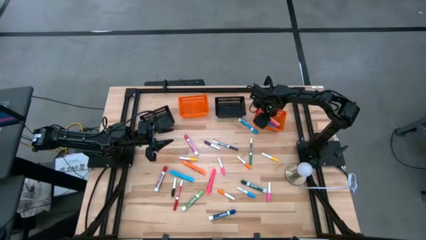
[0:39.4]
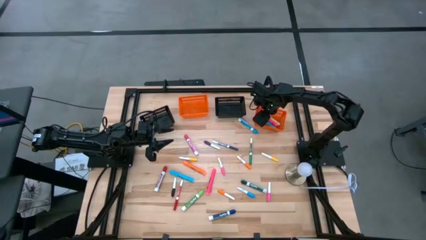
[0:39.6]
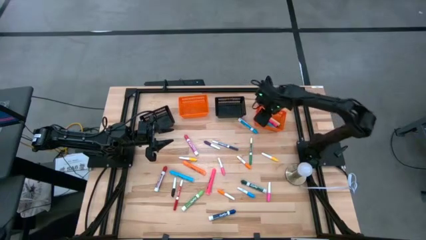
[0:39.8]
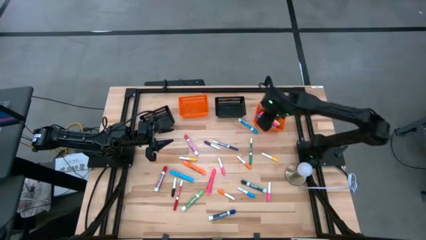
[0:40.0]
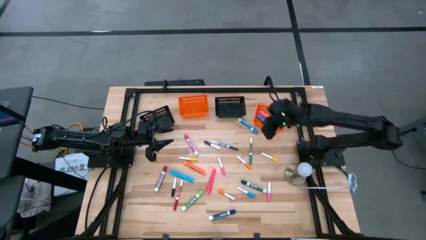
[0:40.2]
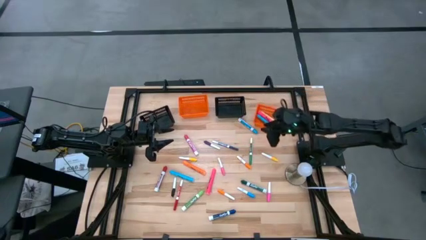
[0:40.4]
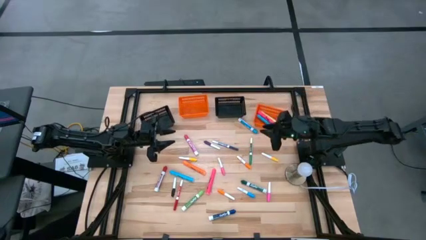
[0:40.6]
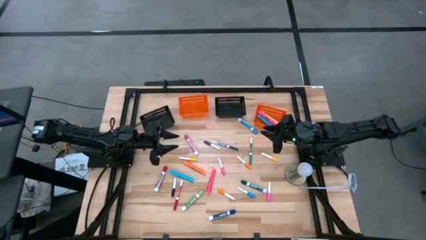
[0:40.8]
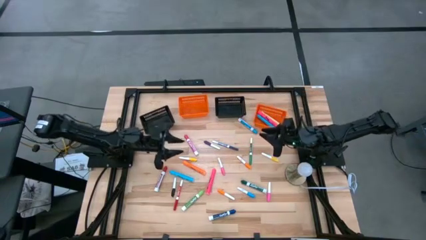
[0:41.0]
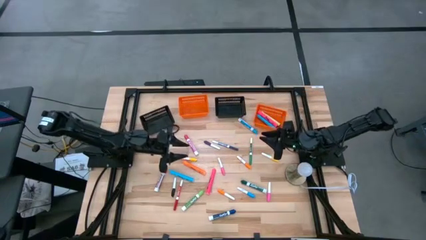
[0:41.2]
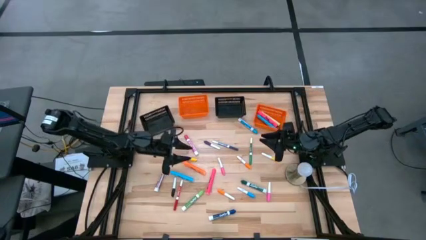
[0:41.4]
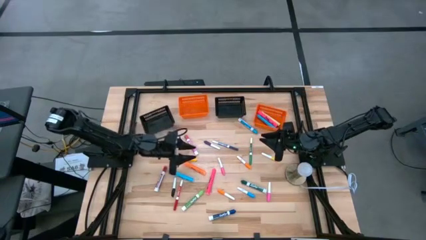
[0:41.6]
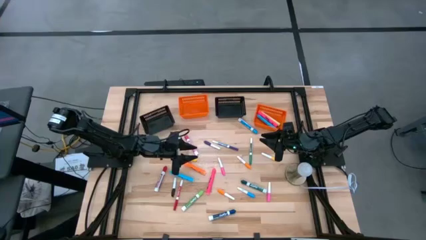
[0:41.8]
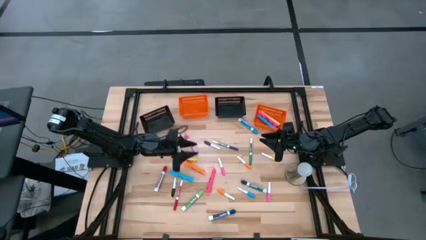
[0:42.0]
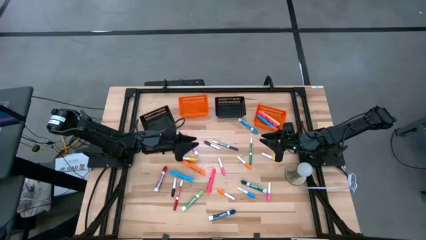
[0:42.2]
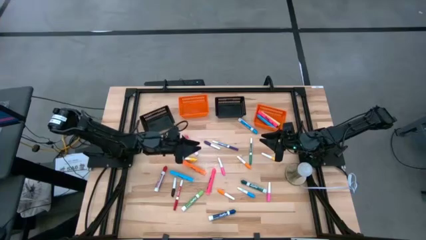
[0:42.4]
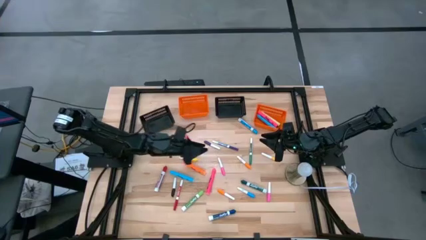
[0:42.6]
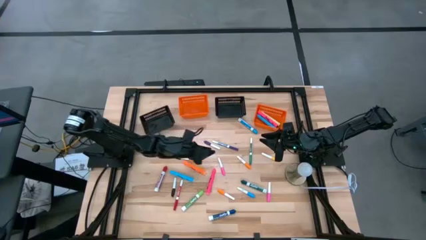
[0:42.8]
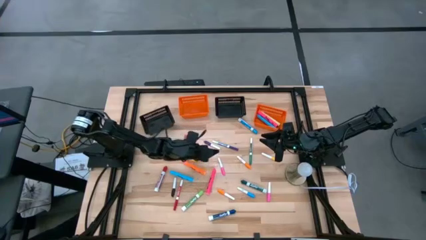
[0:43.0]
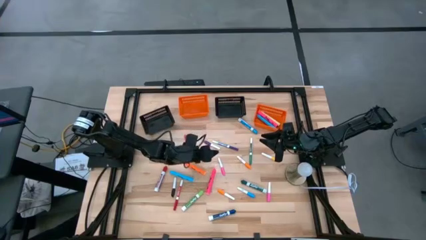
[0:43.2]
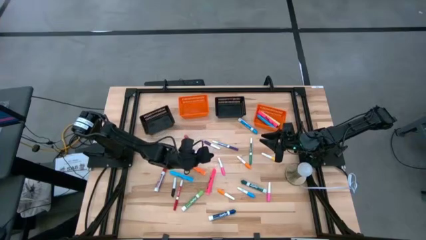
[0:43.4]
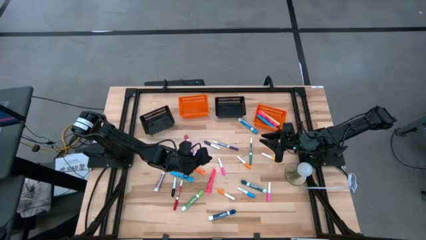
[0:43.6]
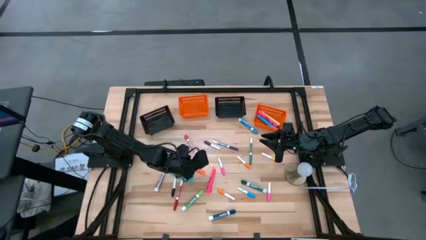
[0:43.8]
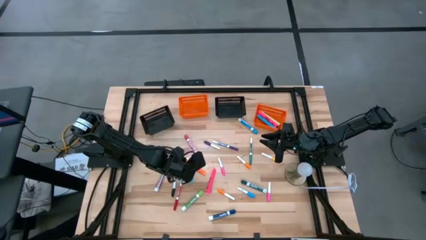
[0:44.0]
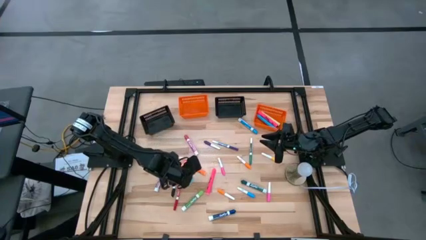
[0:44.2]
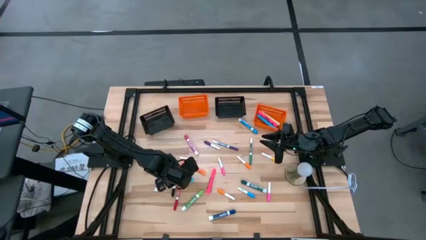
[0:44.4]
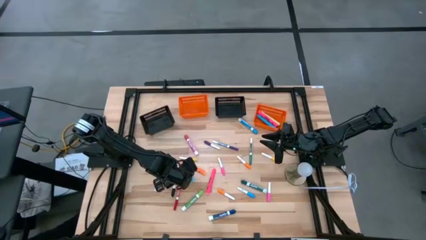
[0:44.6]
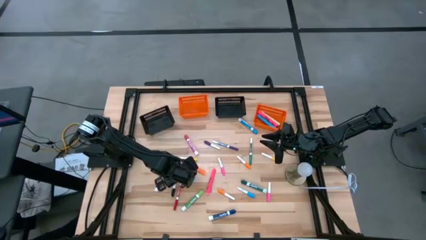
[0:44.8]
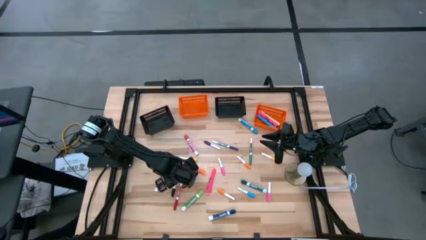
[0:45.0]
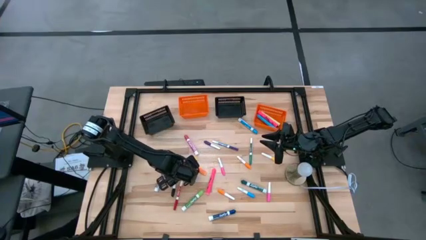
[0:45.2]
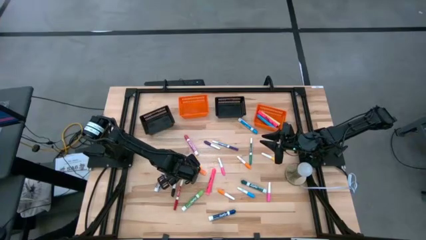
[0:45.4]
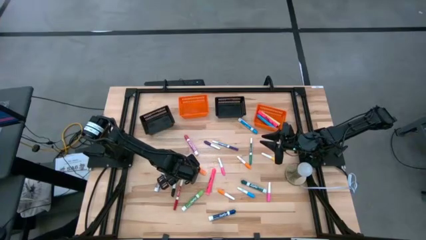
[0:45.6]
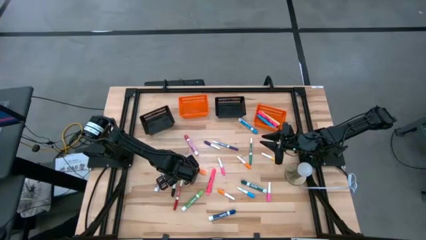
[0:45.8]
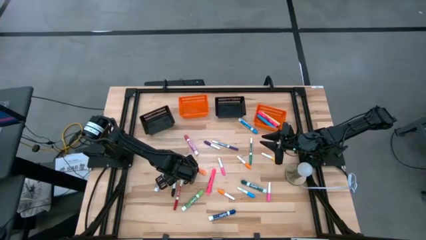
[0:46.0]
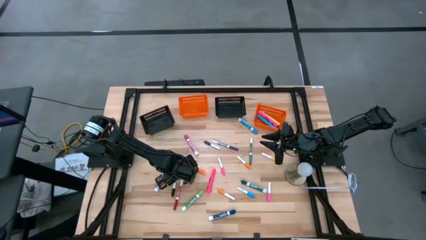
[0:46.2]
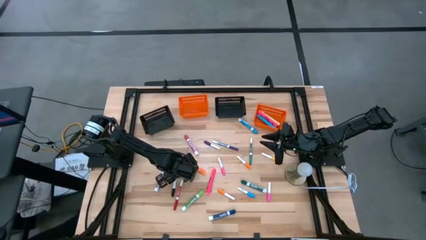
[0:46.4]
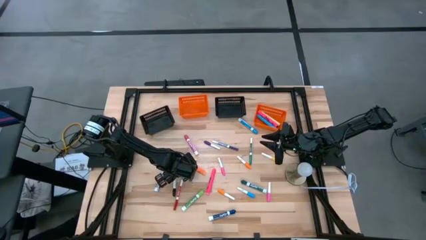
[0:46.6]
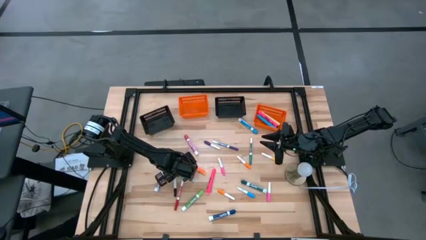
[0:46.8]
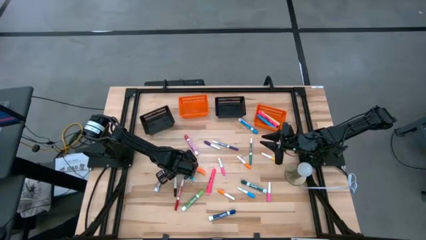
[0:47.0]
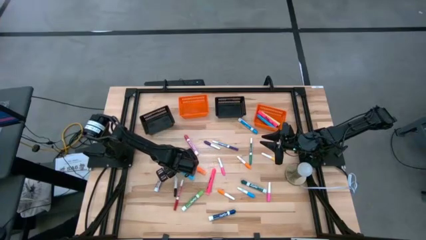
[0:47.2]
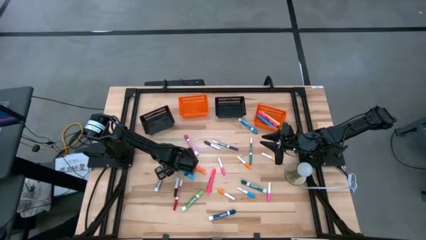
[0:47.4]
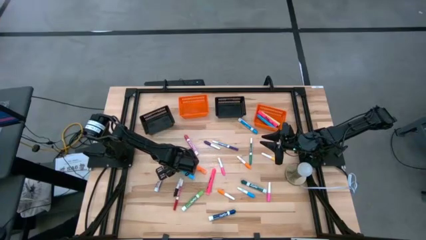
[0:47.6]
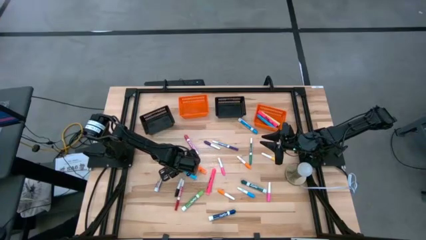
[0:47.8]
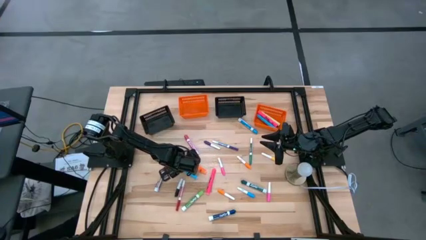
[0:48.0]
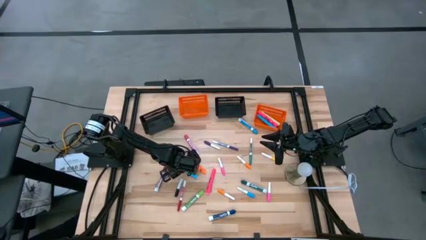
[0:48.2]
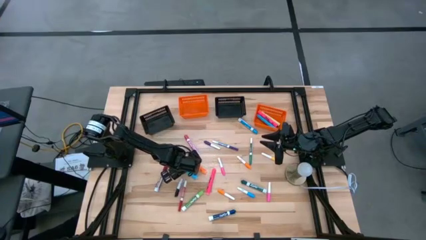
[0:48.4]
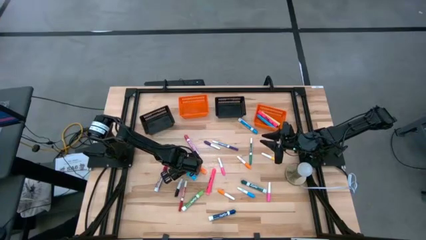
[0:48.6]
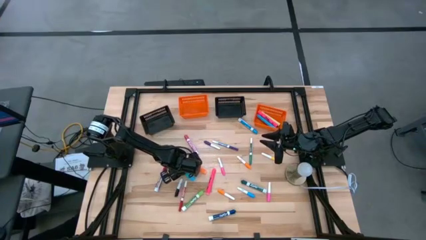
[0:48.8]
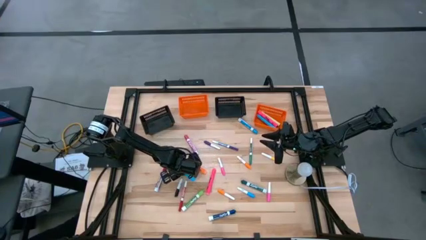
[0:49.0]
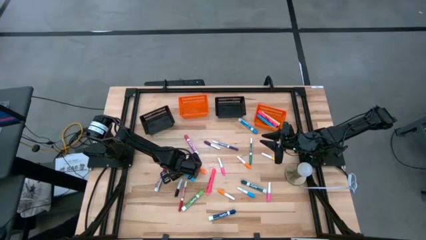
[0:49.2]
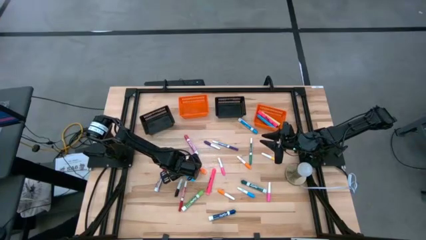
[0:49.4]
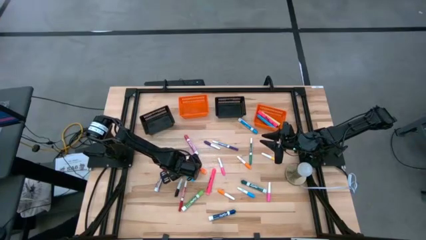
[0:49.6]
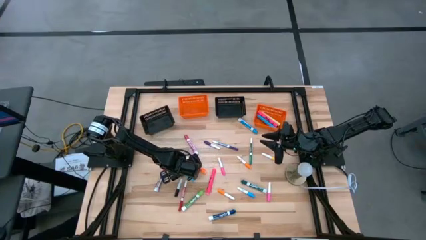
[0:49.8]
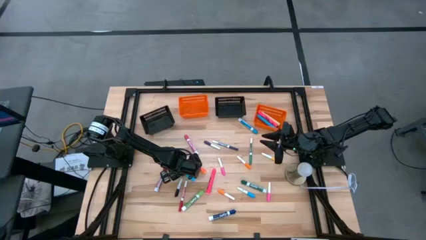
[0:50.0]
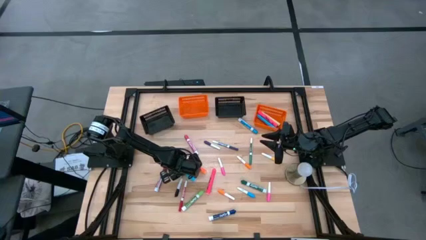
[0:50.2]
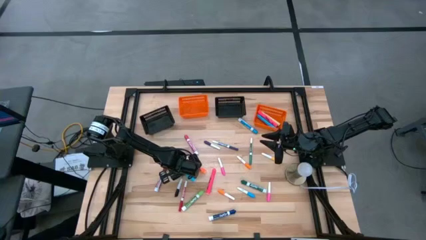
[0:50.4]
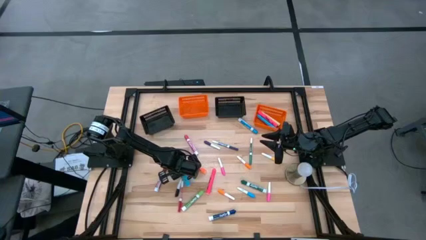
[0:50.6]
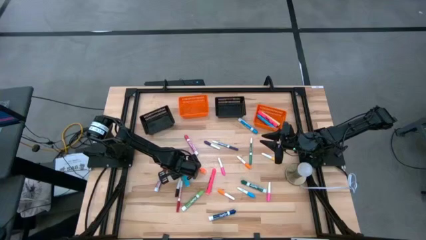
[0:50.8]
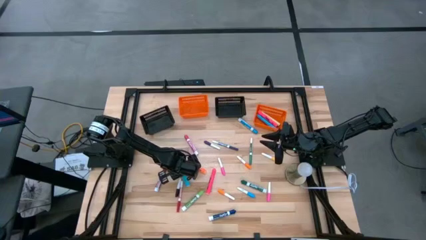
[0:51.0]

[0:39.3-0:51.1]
Task: Pick & Place Markers
Put the blue marker into the right orange bin
